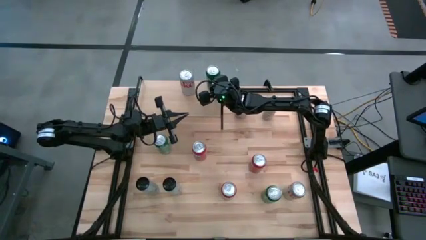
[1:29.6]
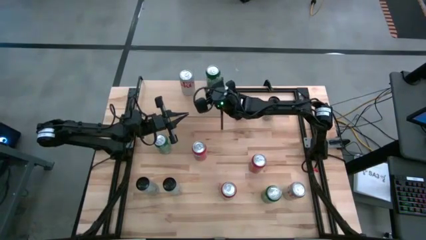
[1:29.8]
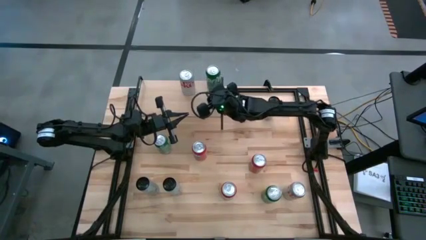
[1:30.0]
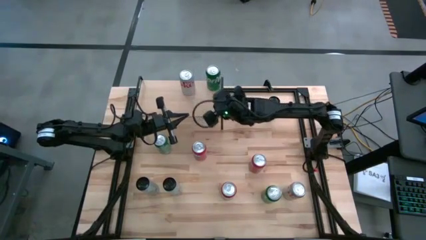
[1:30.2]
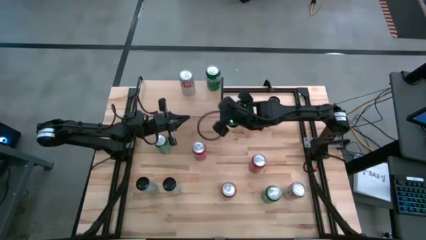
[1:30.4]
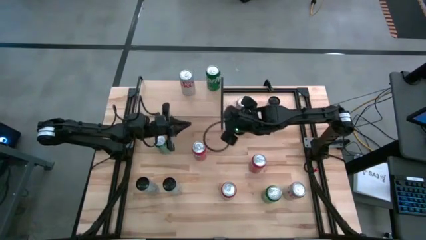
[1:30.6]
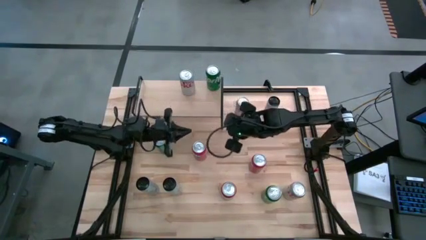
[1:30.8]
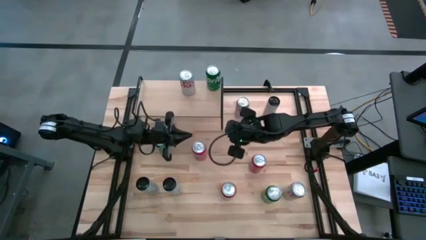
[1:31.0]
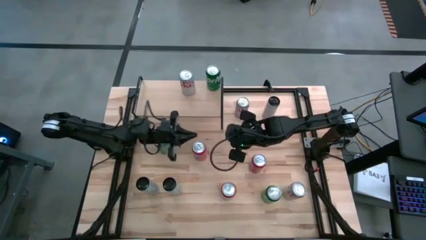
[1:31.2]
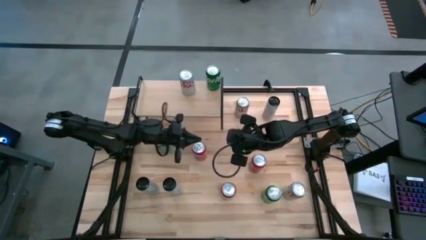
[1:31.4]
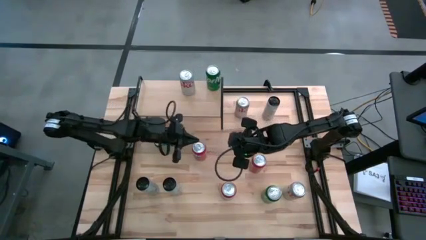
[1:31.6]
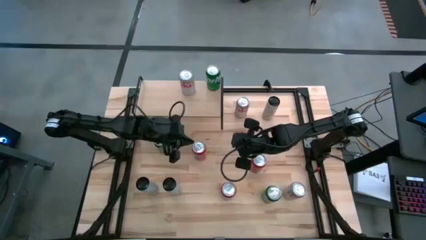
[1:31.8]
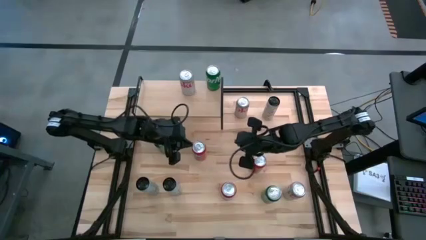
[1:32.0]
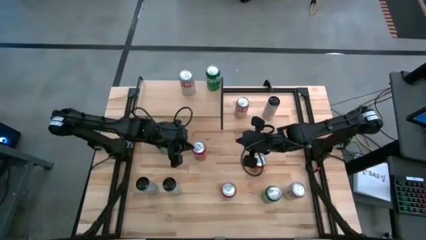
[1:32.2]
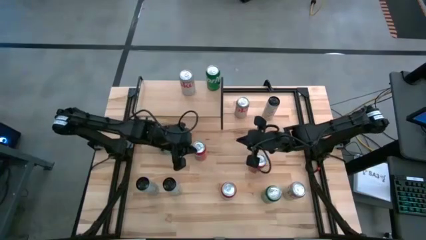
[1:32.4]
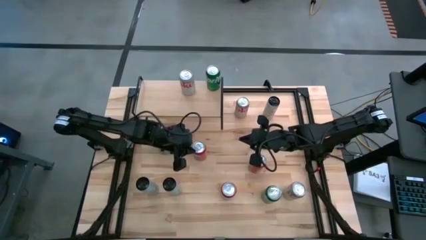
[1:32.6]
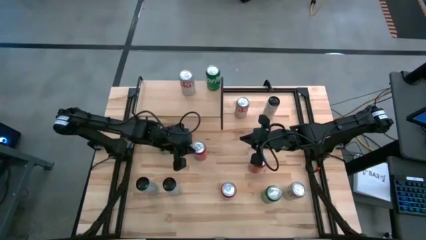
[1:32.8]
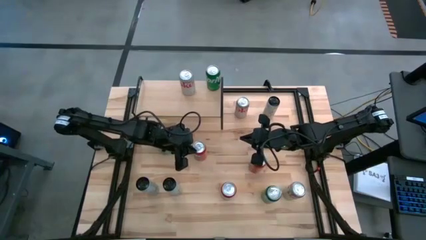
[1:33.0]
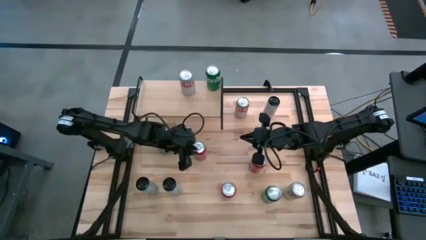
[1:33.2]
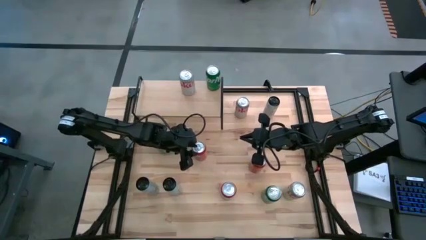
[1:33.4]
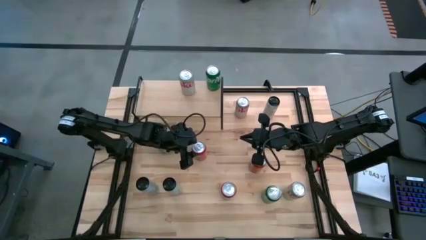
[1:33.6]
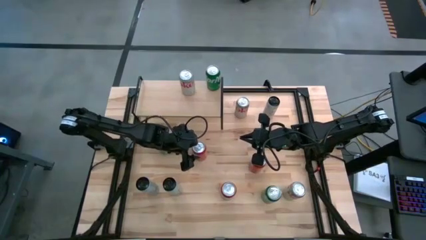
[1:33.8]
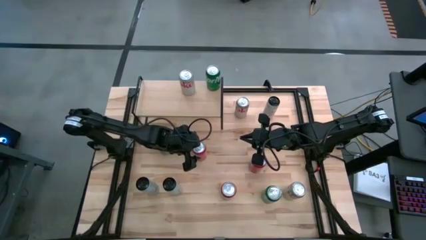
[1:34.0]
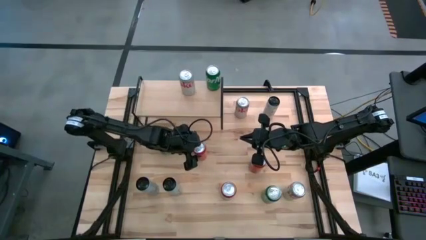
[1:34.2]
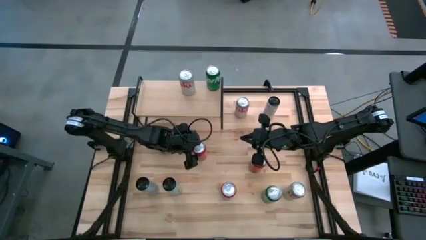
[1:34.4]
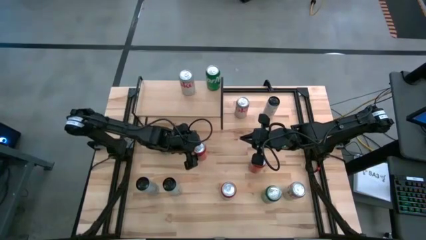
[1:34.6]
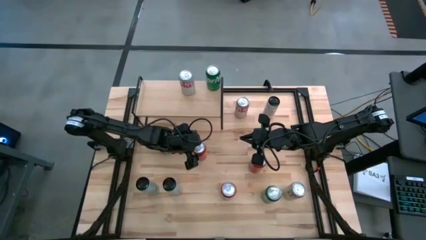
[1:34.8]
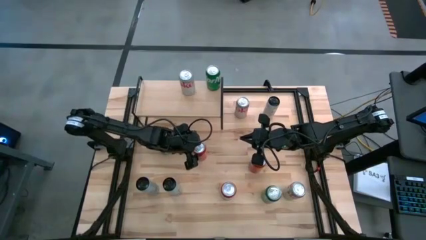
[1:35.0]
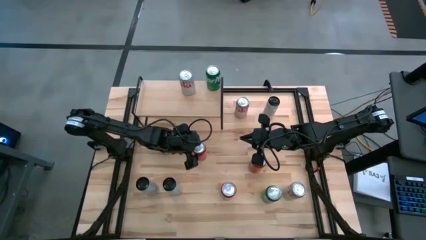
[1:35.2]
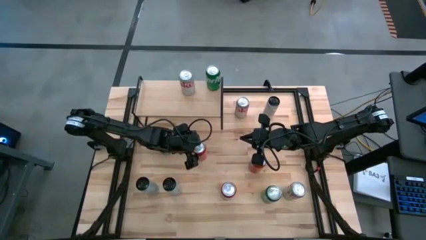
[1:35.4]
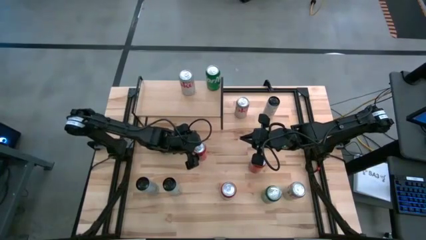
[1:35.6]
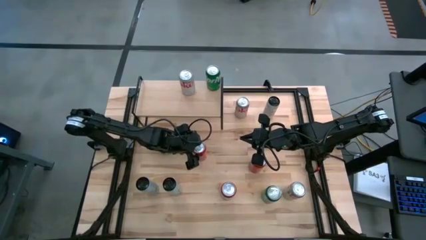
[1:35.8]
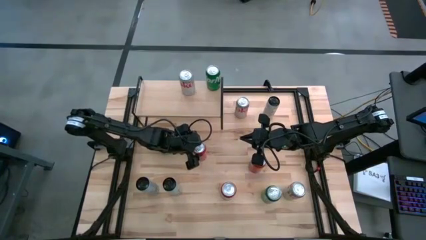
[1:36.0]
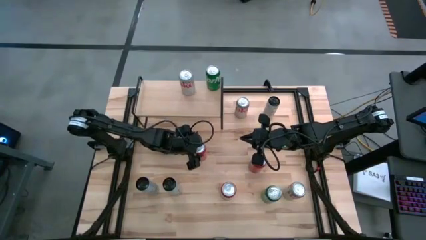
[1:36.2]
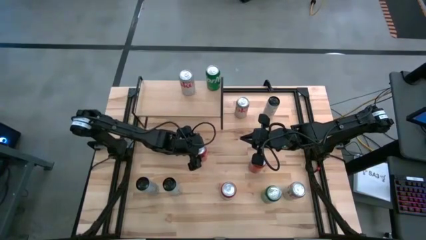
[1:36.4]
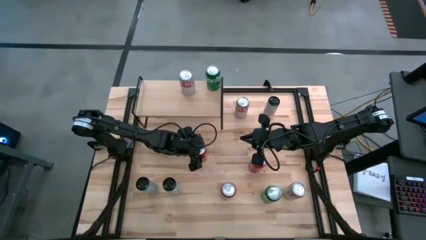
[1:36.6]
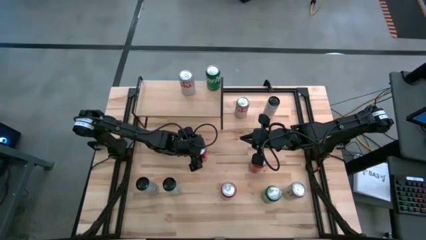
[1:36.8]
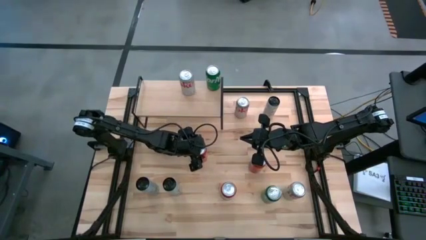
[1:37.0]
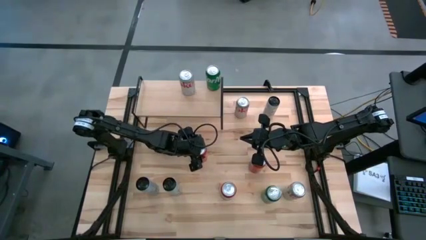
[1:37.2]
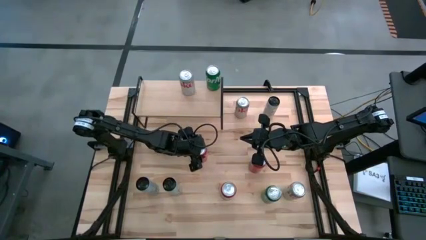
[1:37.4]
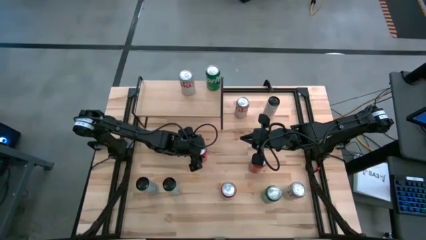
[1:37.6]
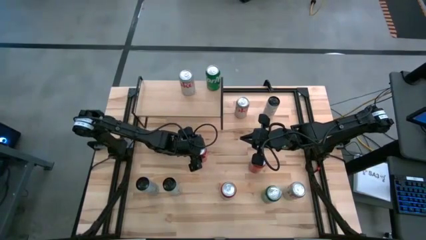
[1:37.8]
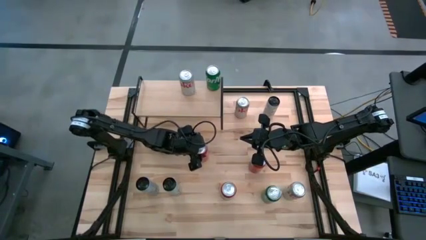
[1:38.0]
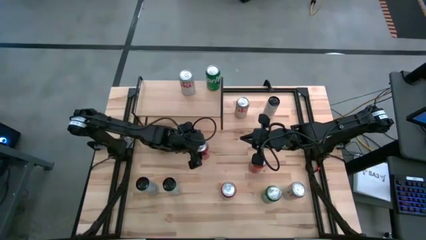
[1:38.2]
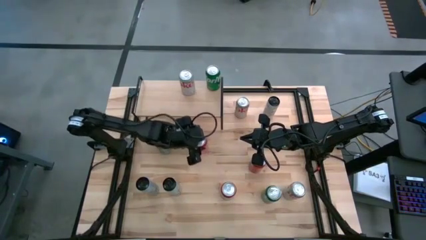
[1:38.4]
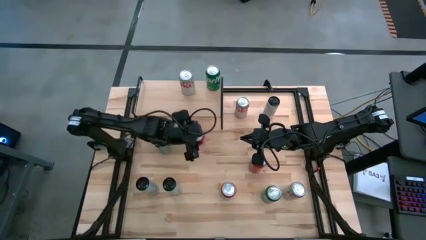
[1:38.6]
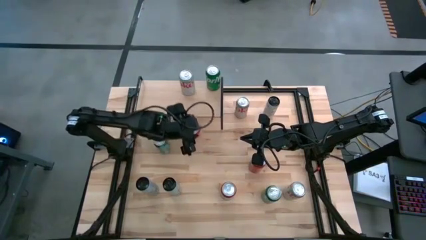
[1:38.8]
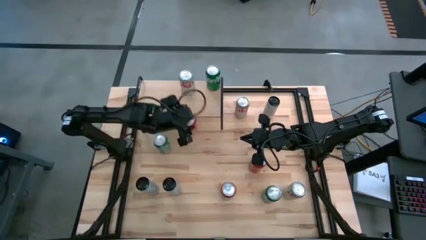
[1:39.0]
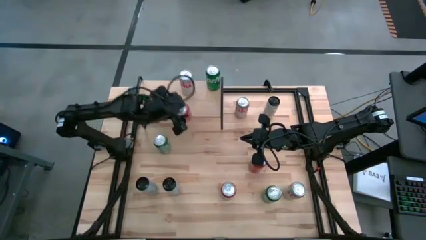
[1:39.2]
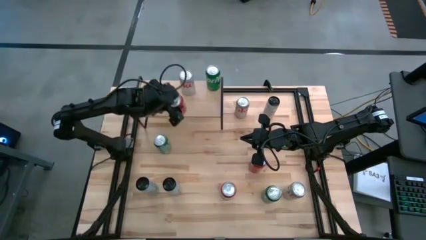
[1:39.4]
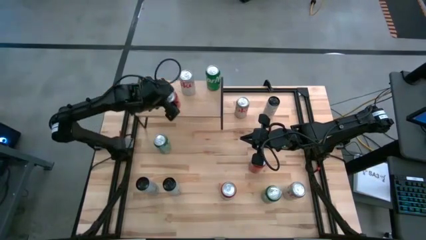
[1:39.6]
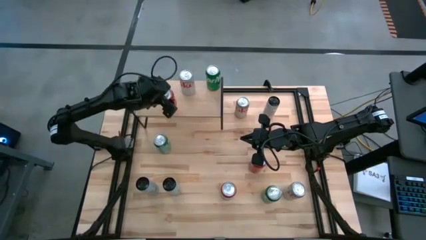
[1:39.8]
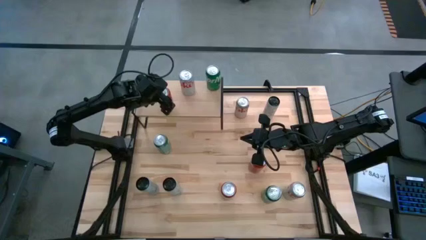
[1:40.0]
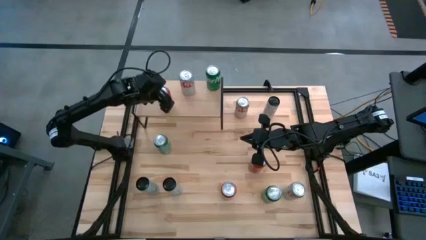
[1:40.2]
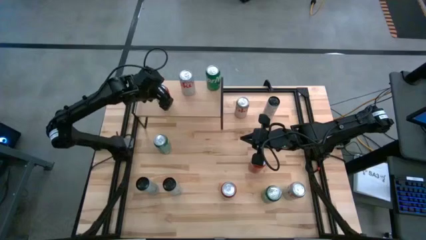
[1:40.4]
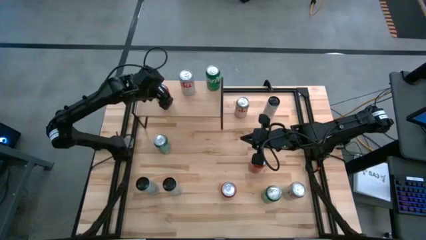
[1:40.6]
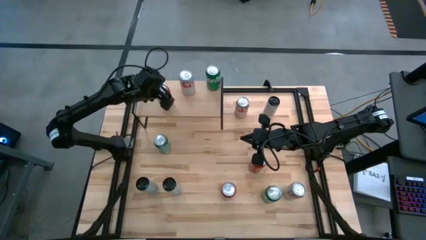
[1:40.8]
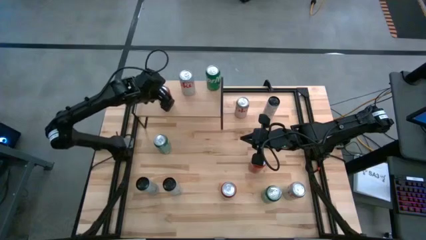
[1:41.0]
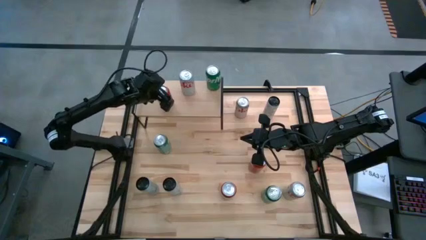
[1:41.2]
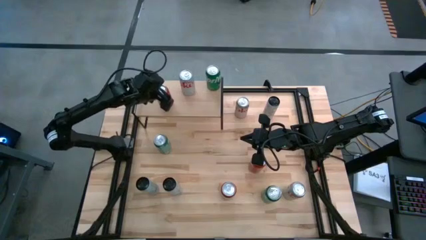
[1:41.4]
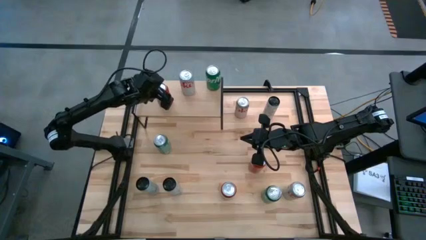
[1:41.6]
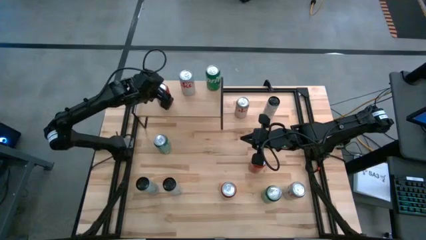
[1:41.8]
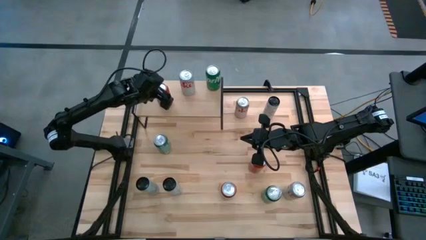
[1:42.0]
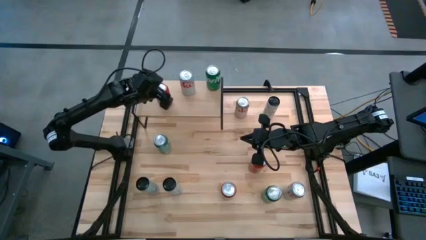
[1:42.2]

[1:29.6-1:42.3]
Task: Place canned beverage on shelf
Put the top left red soda can on the shelf
